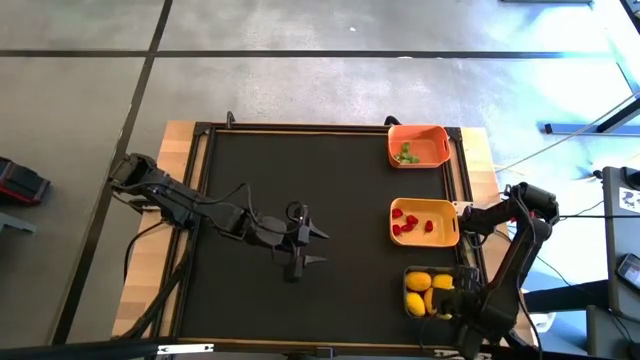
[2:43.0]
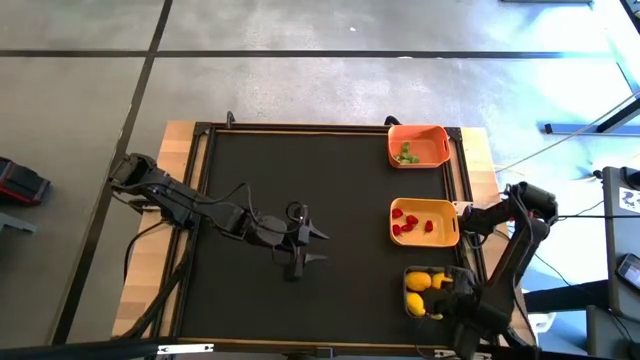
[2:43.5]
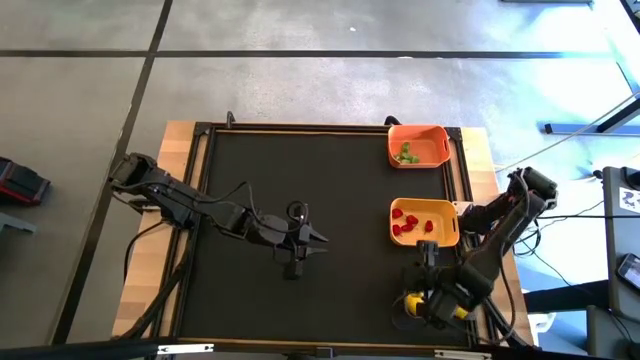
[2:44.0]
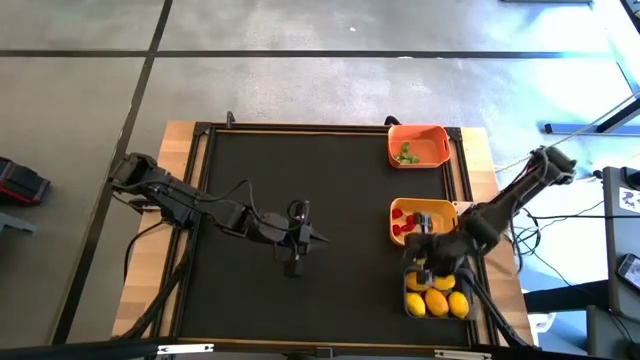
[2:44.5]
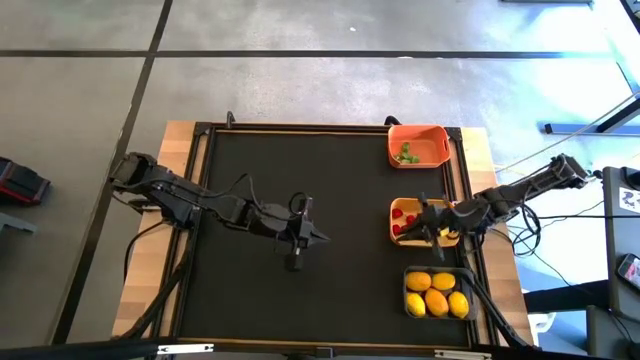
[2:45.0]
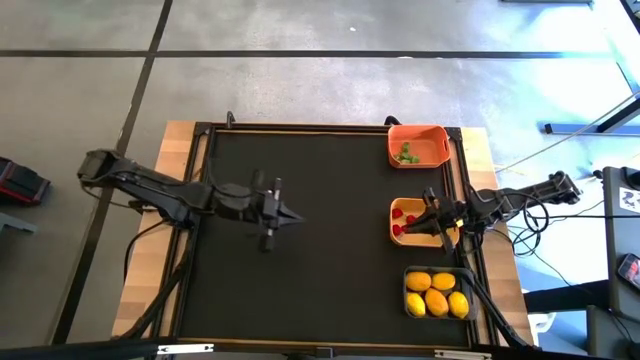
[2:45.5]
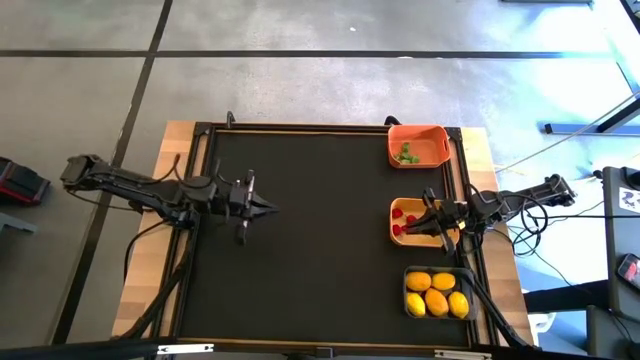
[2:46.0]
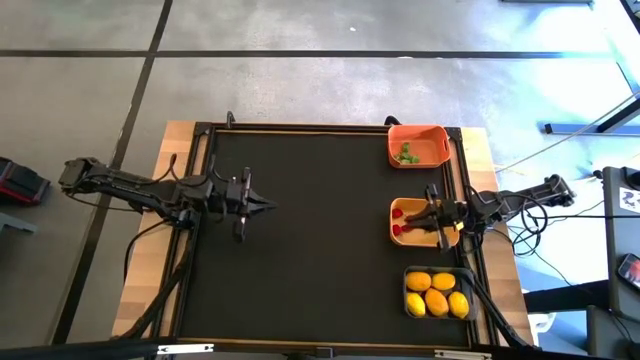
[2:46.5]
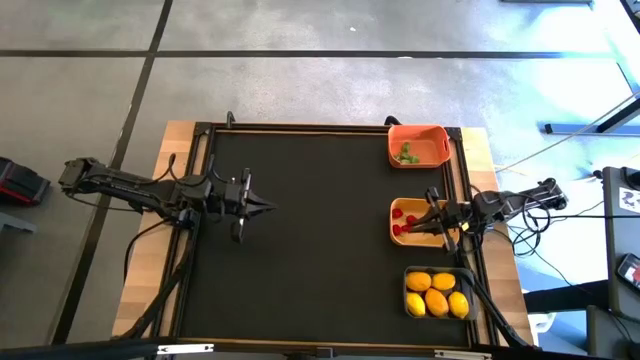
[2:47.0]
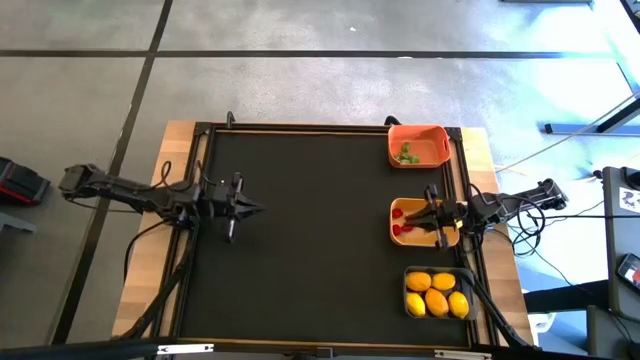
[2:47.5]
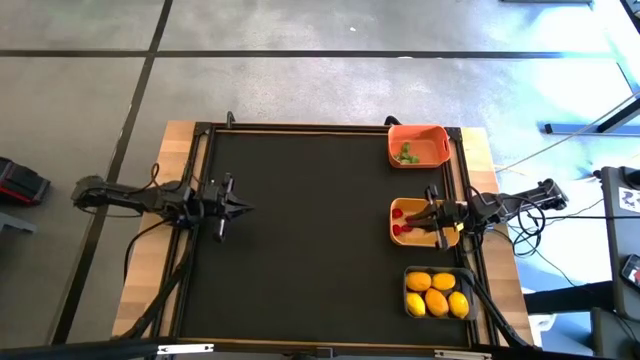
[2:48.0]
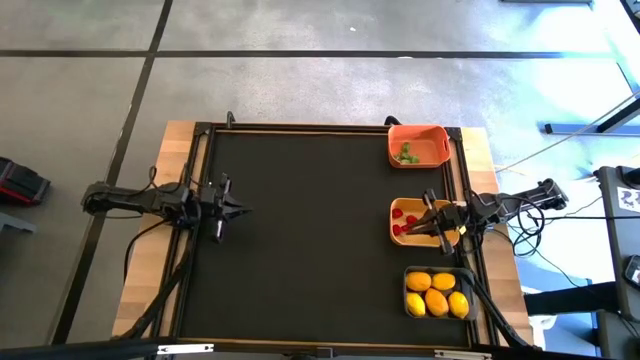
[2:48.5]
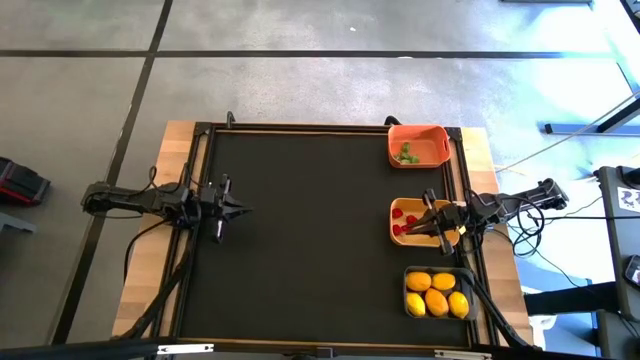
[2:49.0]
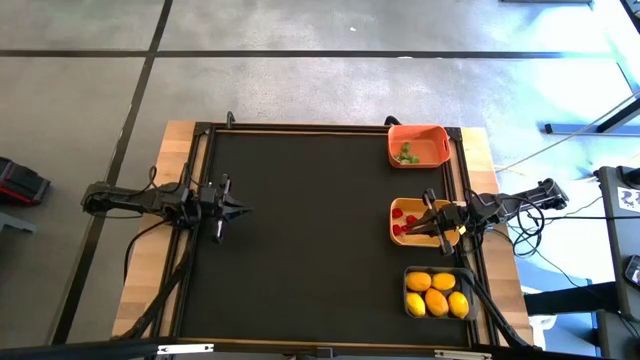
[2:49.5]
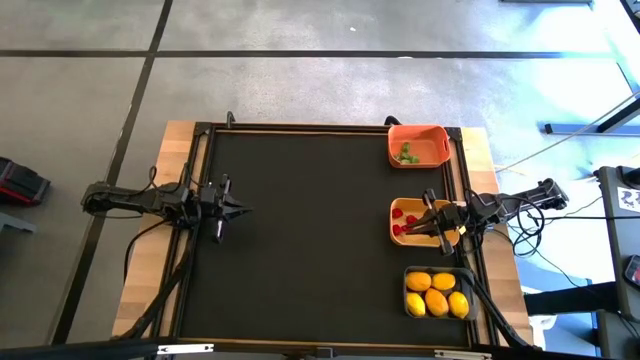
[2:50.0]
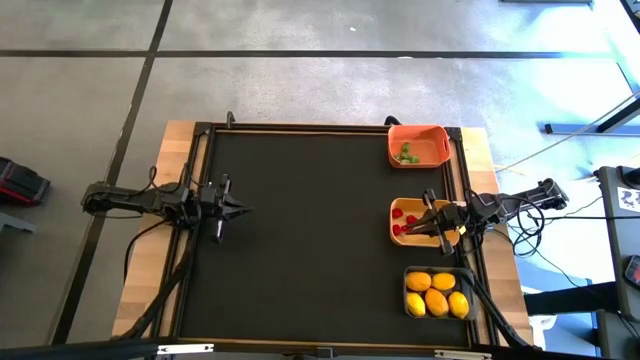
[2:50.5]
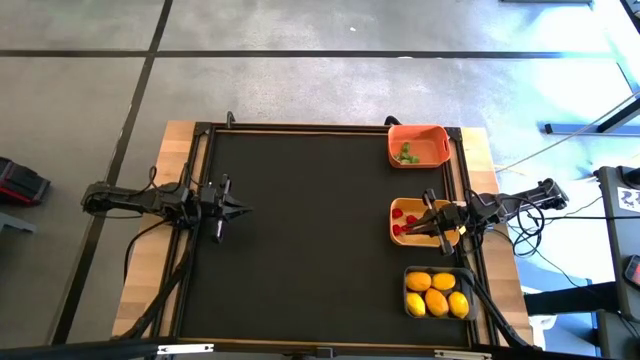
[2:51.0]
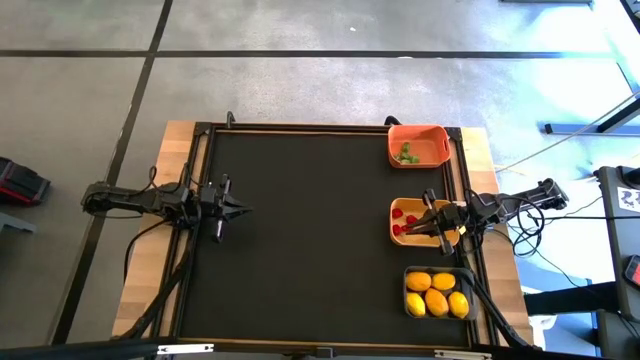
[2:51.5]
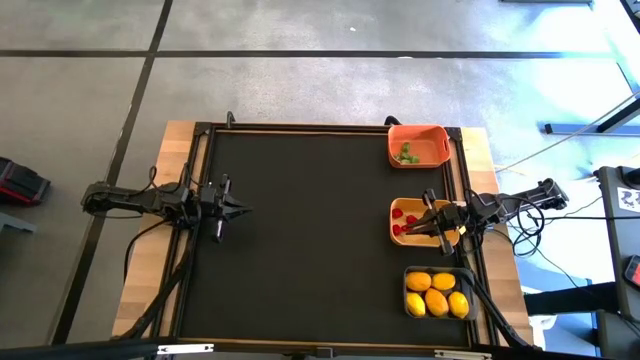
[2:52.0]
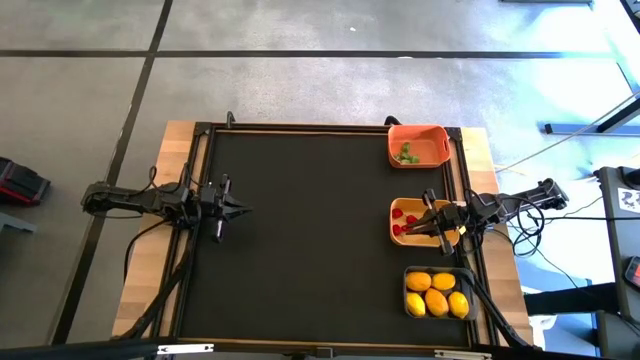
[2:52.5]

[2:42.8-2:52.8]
Task: Sort produce into baskets
Return to Home Position

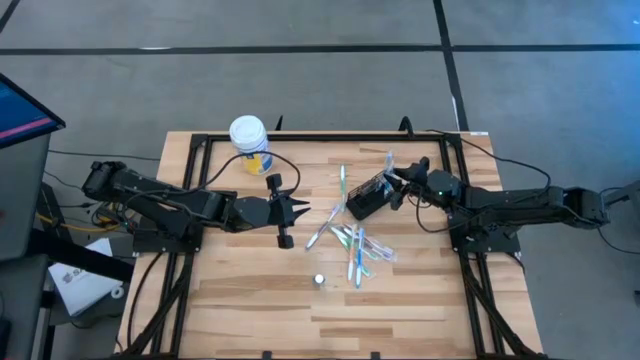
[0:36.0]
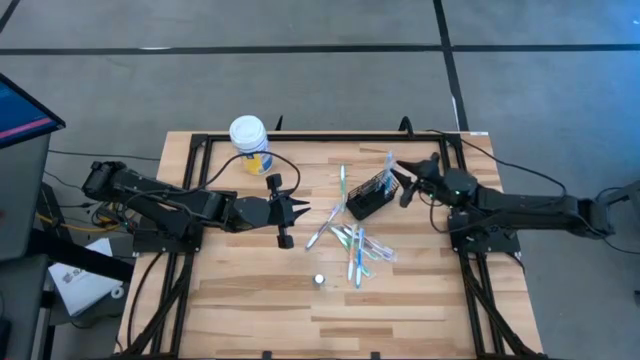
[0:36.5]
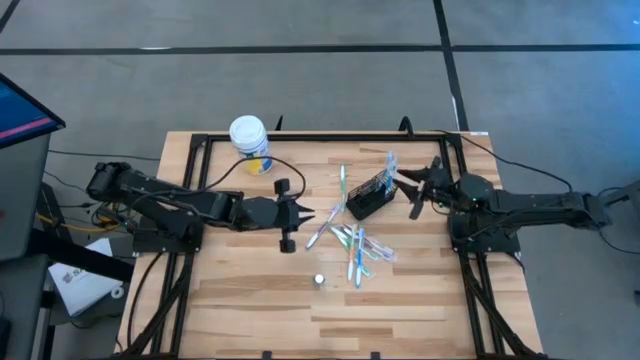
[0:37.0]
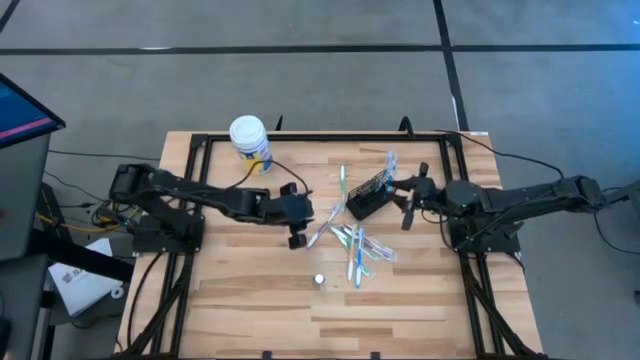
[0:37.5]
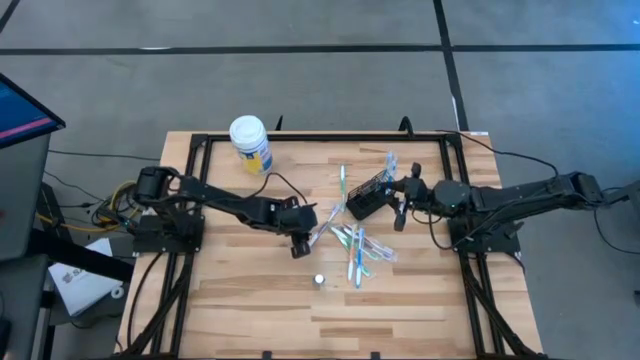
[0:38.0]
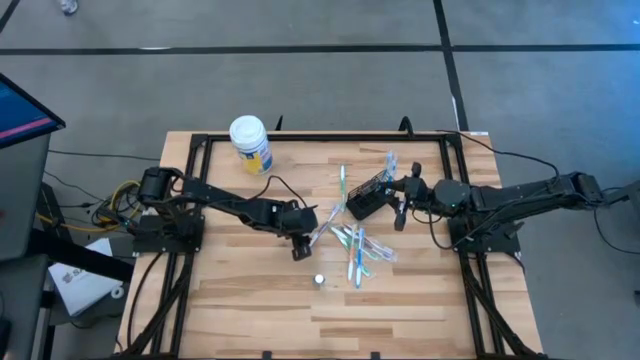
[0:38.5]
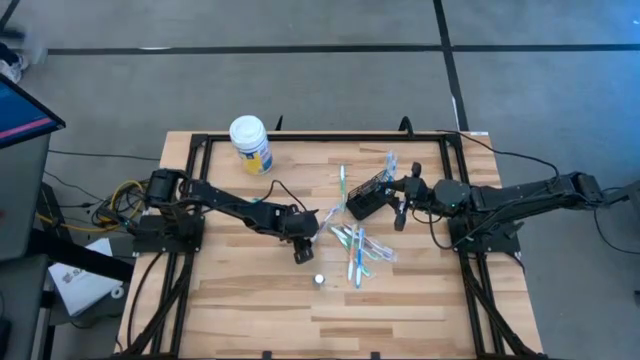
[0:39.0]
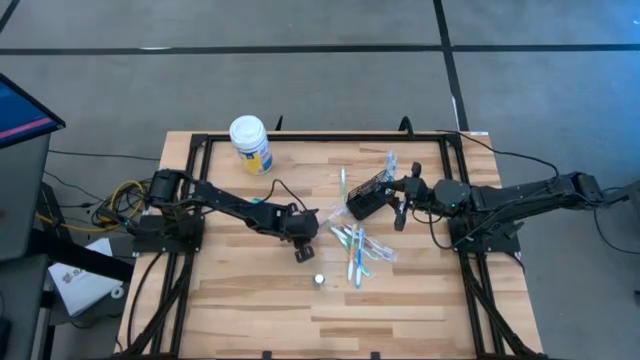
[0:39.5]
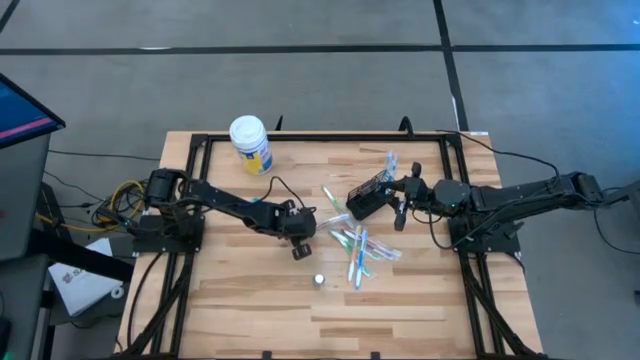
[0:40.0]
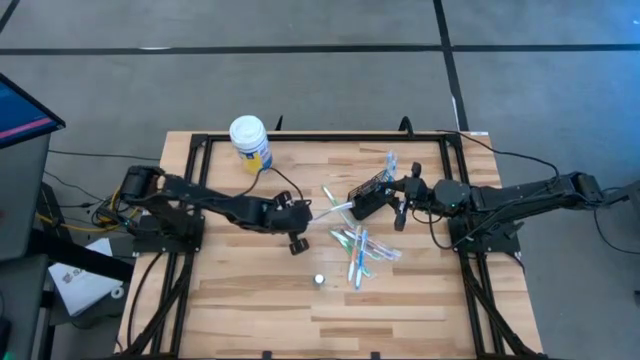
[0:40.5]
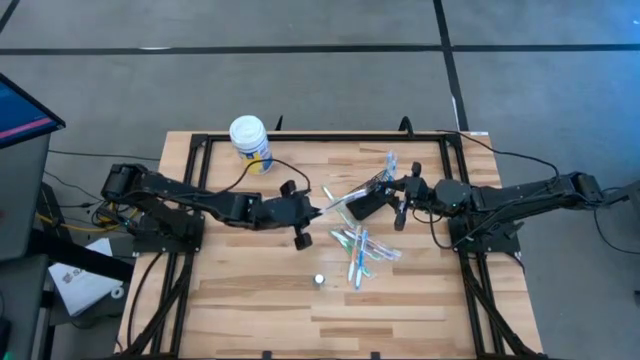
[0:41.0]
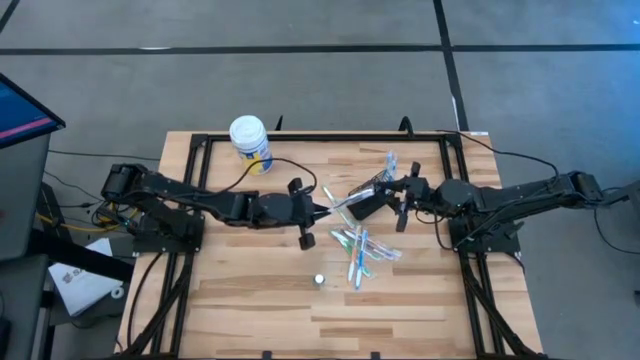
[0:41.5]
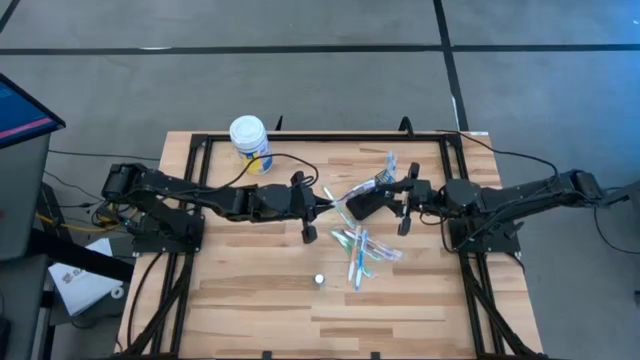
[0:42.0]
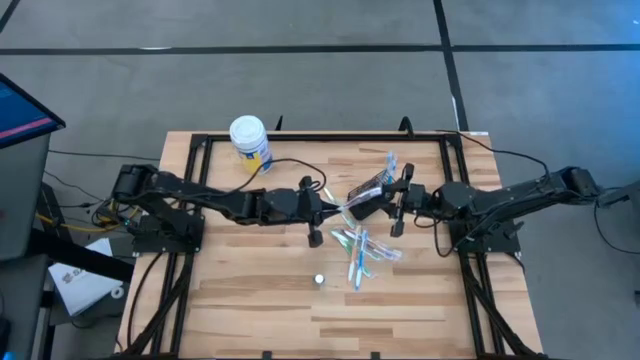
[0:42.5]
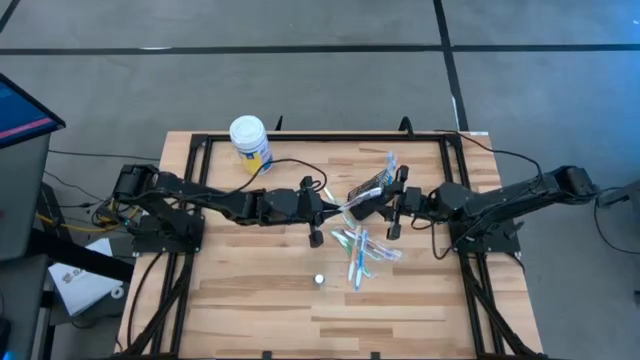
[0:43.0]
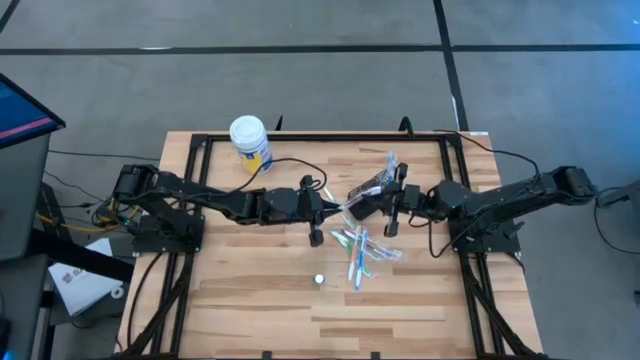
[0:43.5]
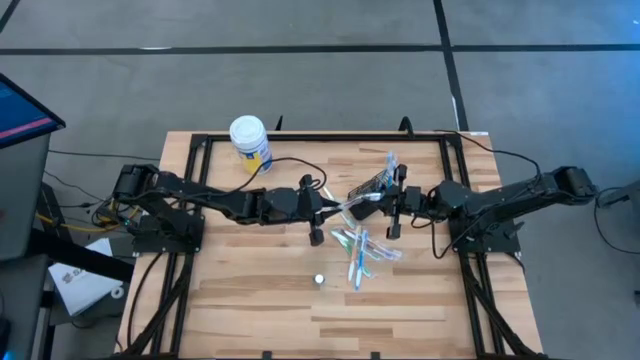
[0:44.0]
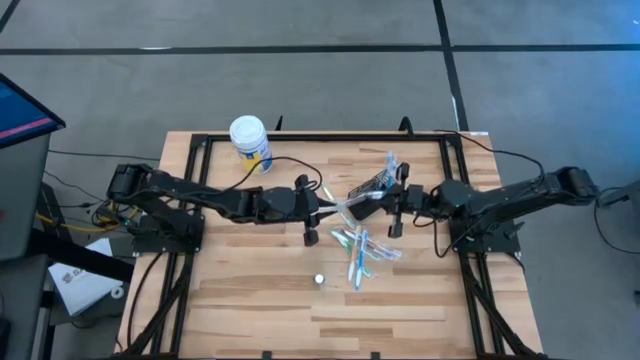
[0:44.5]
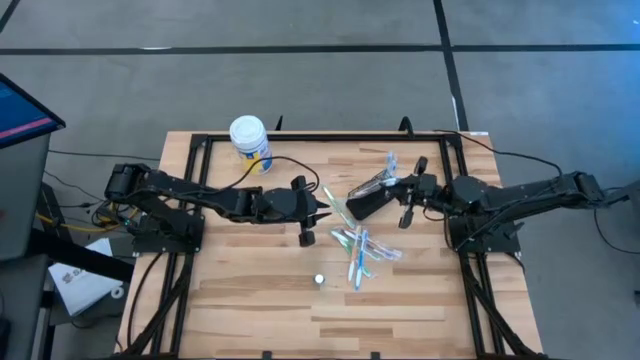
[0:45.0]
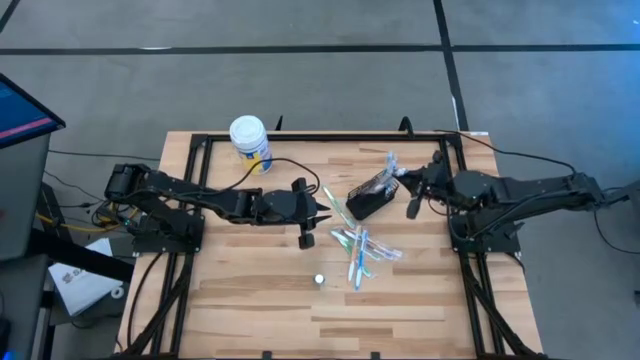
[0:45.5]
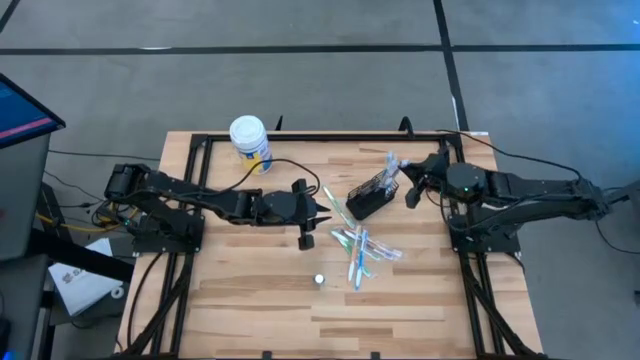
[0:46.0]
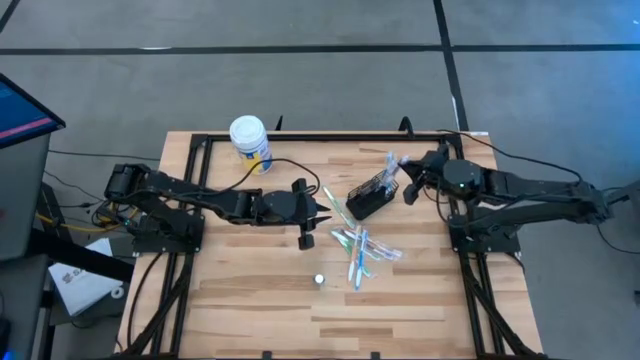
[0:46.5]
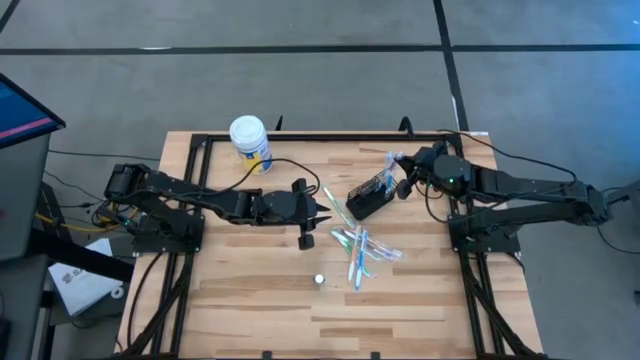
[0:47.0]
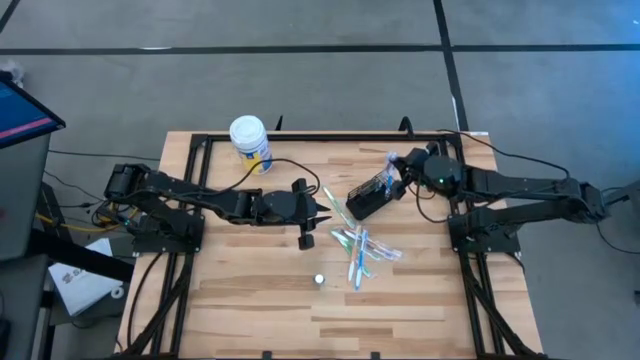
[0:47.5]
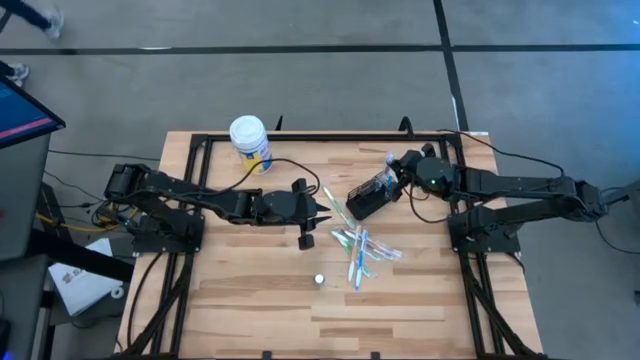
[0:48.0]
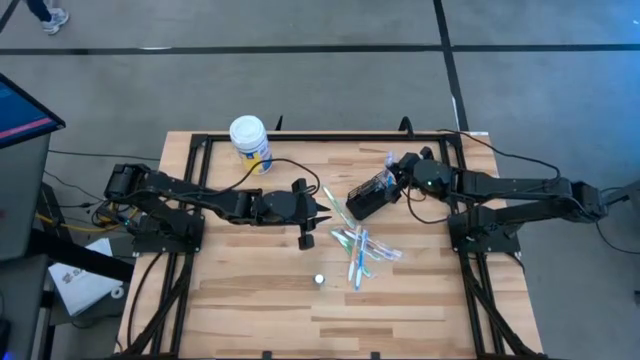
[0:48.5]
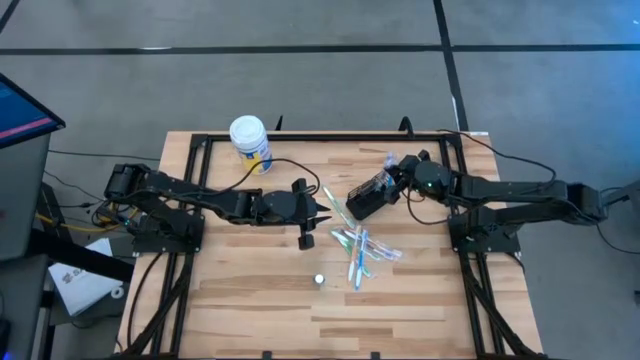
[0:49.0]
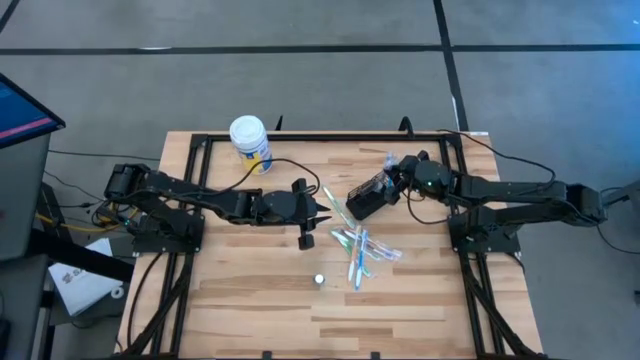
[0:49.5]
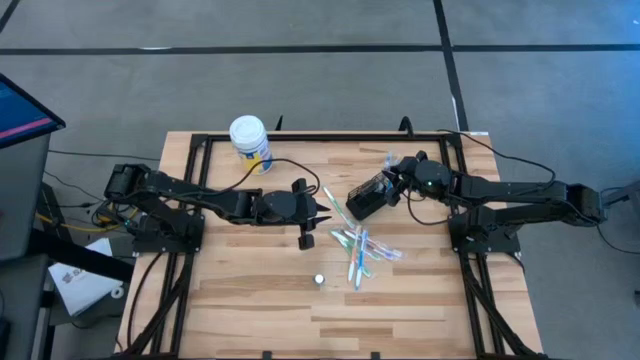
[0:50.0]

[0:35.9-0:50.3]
Task: Pick & Place toothbrushing station
Put the purple toothbrush into the mesh organizer
